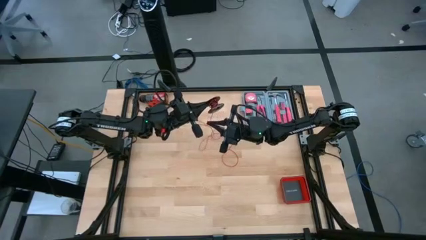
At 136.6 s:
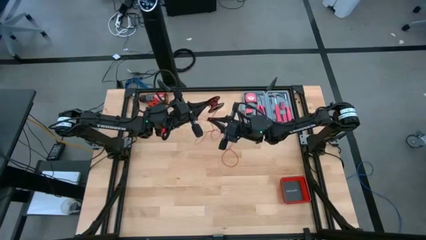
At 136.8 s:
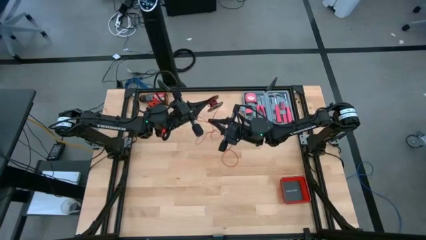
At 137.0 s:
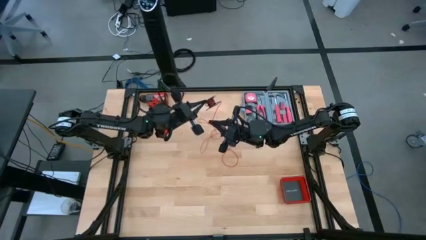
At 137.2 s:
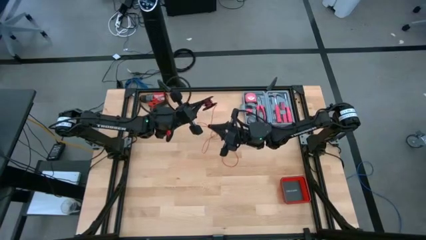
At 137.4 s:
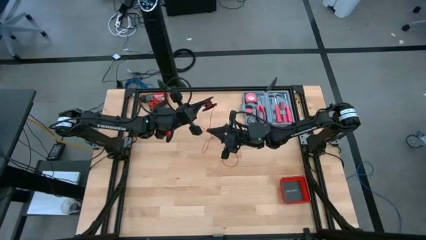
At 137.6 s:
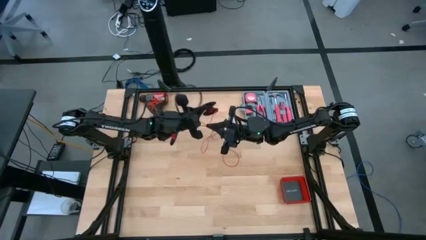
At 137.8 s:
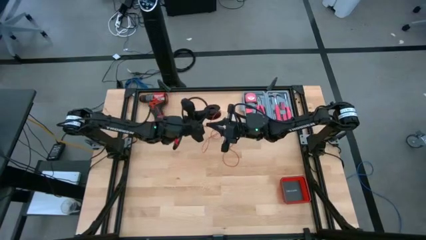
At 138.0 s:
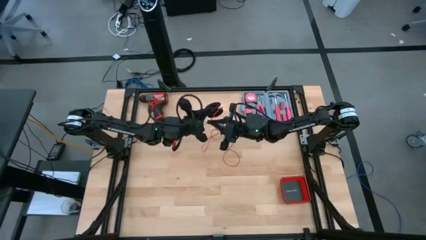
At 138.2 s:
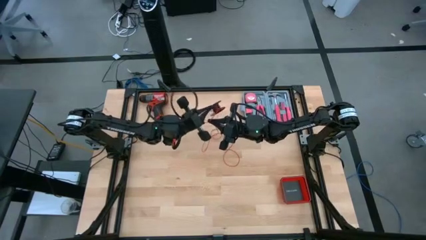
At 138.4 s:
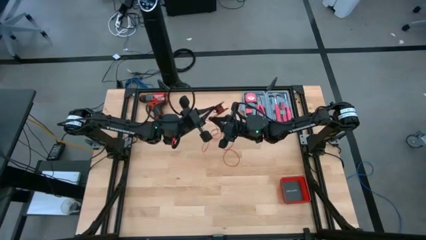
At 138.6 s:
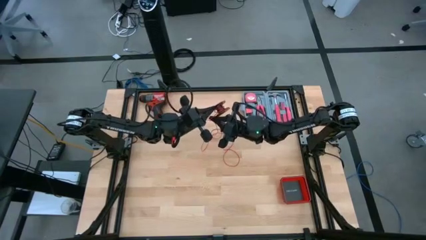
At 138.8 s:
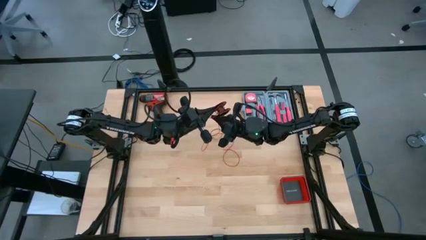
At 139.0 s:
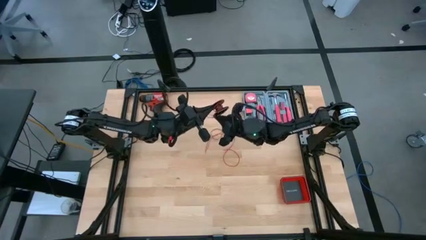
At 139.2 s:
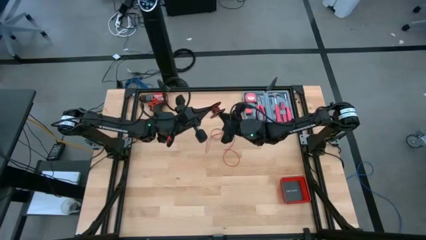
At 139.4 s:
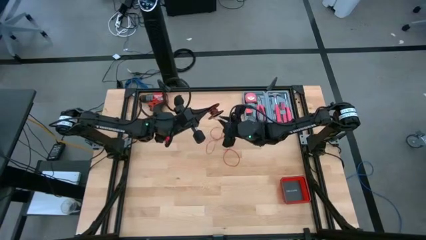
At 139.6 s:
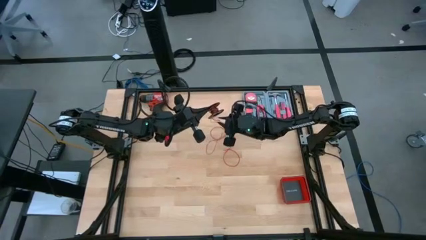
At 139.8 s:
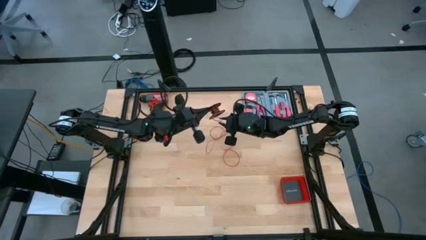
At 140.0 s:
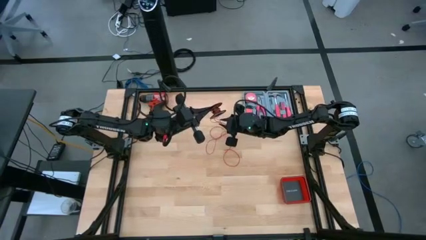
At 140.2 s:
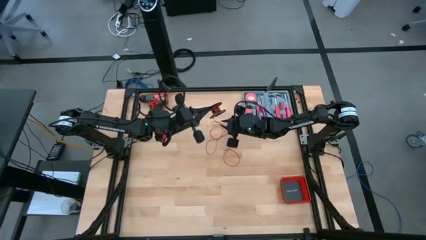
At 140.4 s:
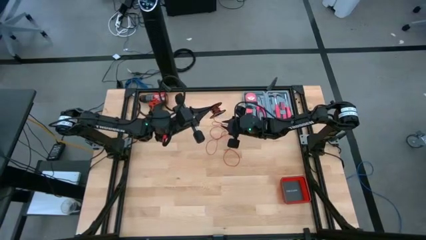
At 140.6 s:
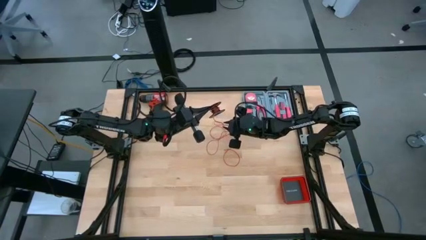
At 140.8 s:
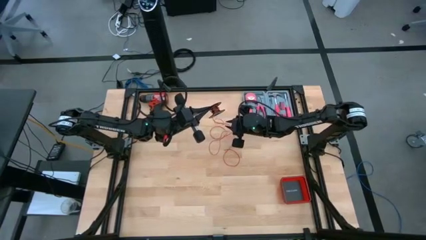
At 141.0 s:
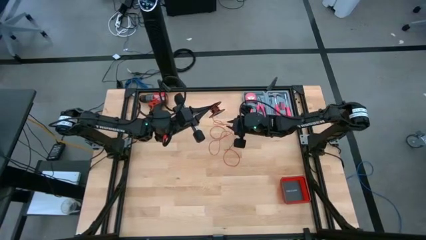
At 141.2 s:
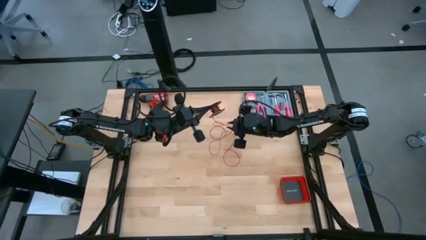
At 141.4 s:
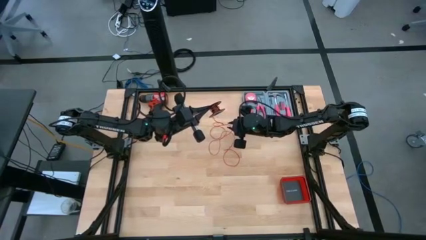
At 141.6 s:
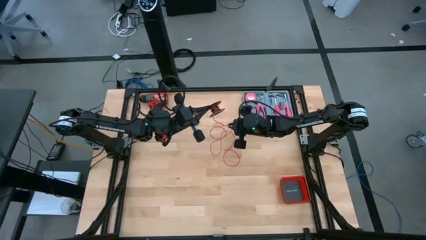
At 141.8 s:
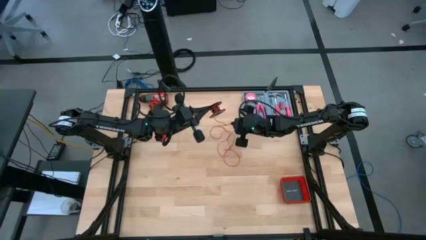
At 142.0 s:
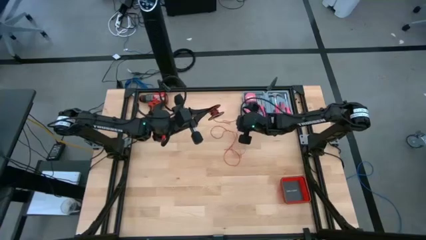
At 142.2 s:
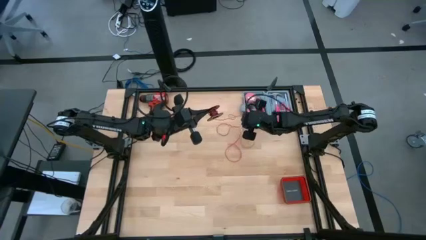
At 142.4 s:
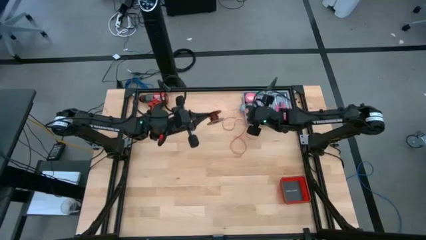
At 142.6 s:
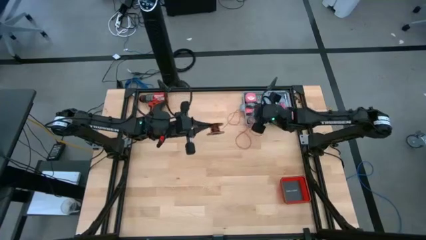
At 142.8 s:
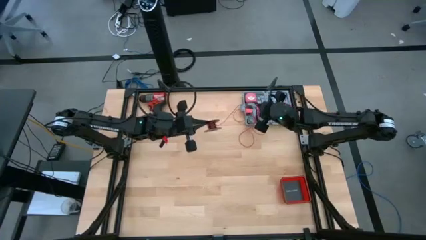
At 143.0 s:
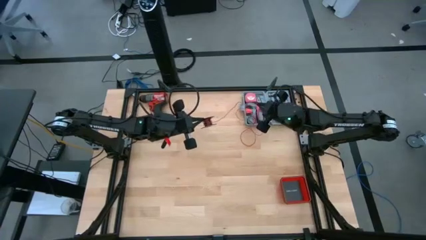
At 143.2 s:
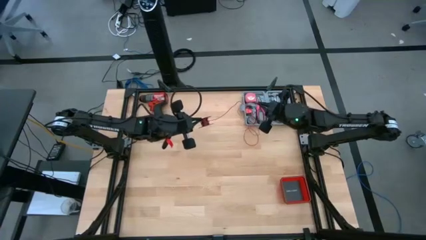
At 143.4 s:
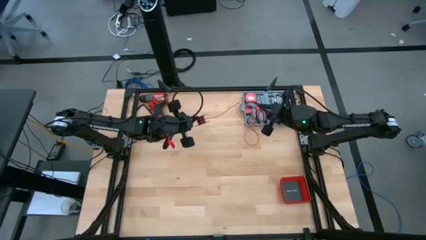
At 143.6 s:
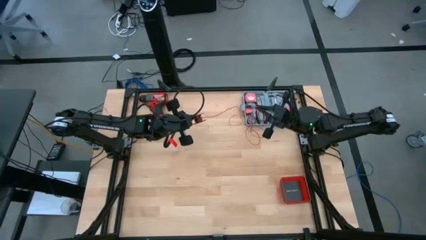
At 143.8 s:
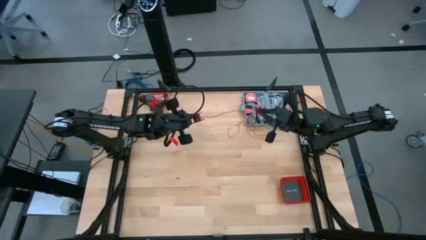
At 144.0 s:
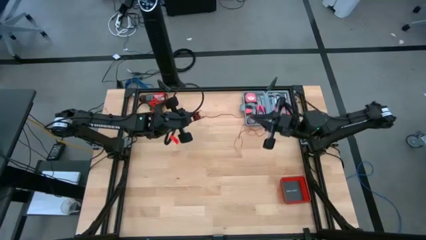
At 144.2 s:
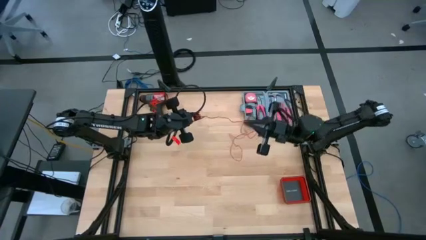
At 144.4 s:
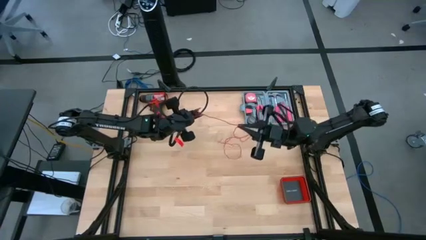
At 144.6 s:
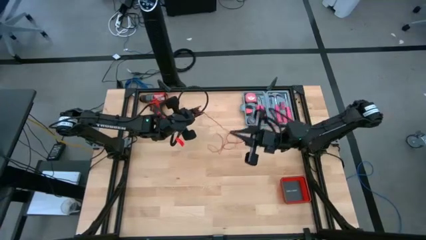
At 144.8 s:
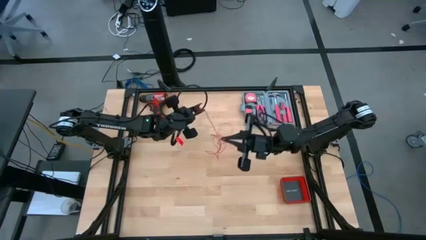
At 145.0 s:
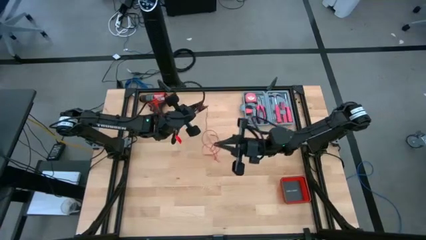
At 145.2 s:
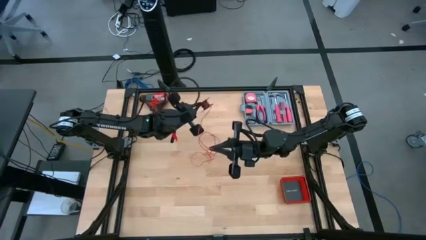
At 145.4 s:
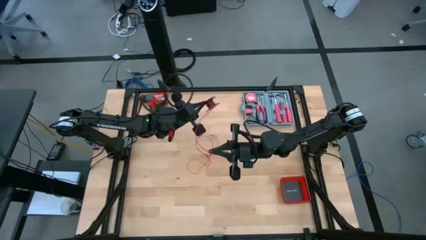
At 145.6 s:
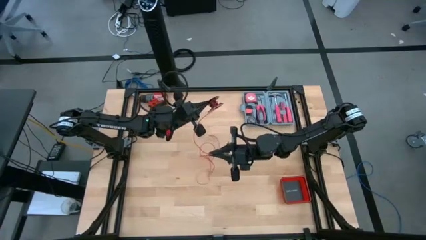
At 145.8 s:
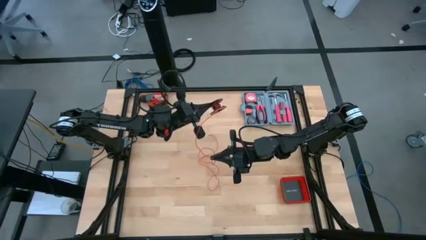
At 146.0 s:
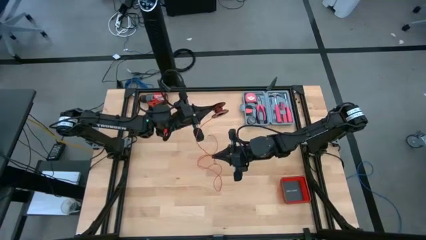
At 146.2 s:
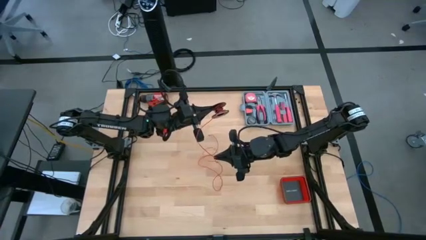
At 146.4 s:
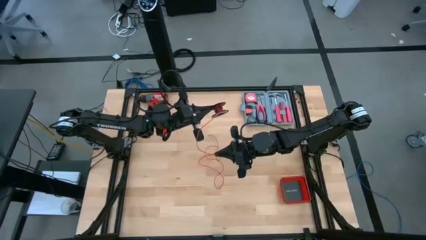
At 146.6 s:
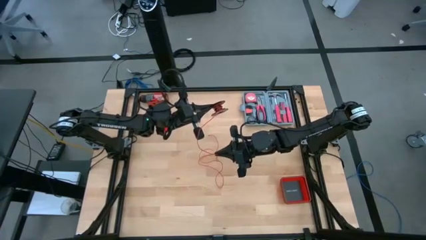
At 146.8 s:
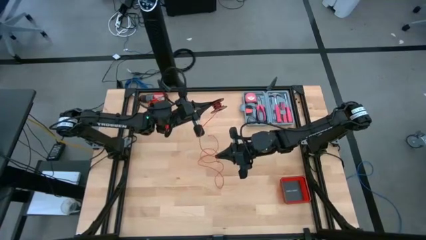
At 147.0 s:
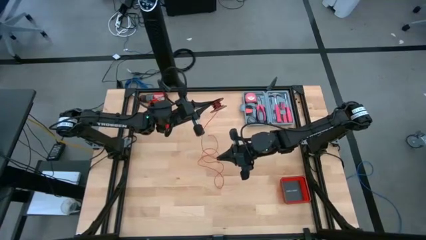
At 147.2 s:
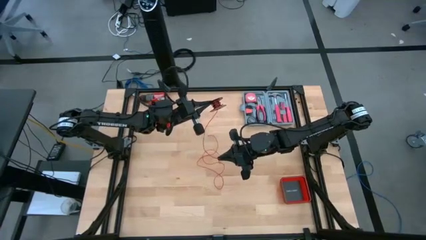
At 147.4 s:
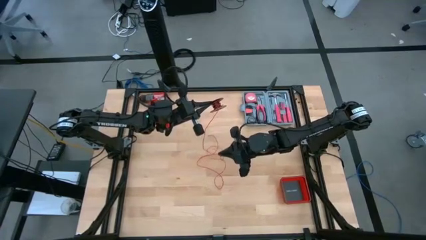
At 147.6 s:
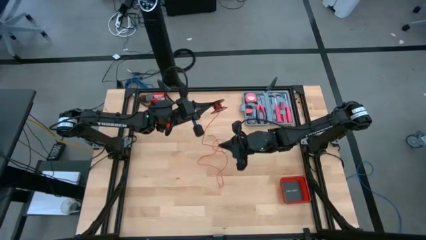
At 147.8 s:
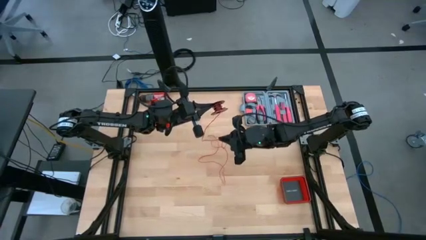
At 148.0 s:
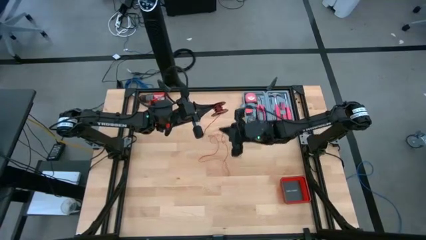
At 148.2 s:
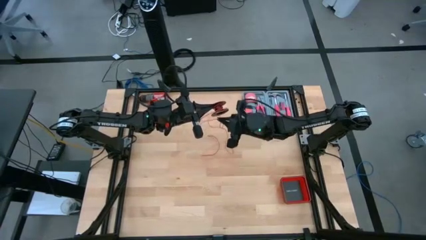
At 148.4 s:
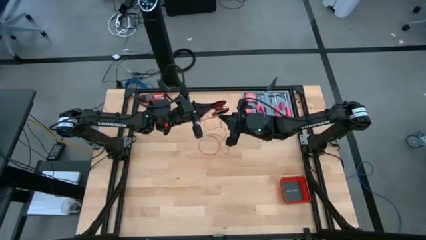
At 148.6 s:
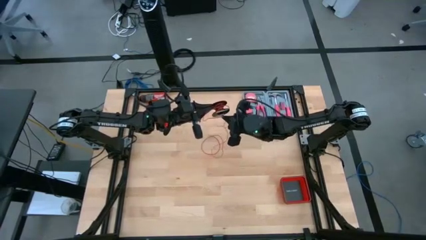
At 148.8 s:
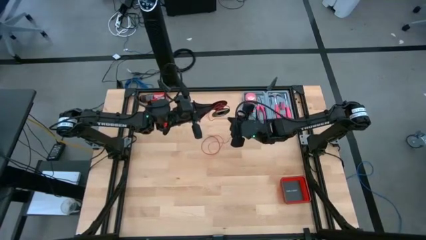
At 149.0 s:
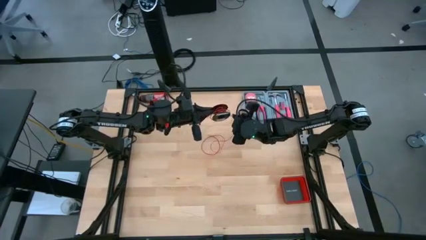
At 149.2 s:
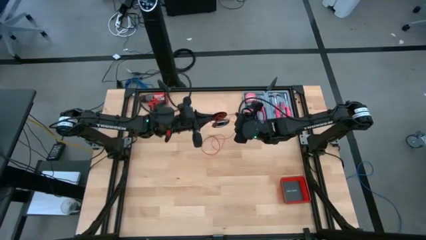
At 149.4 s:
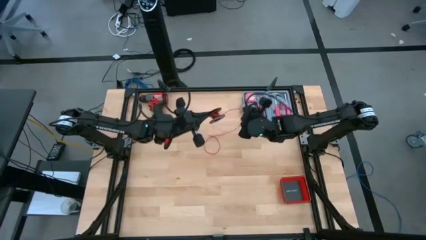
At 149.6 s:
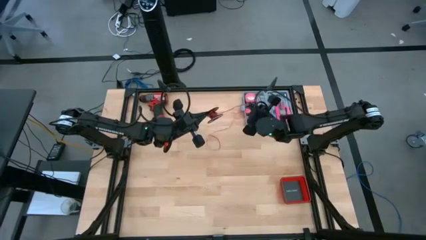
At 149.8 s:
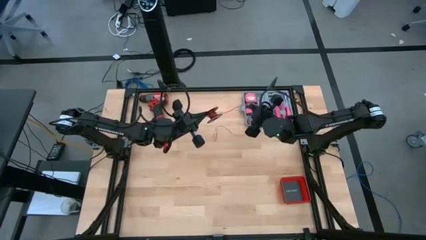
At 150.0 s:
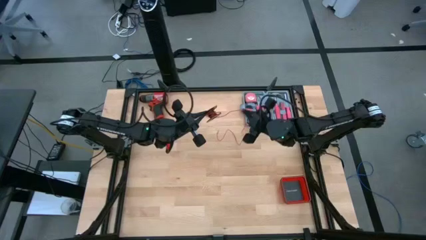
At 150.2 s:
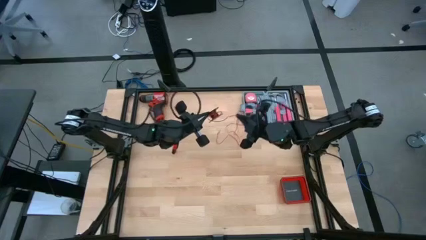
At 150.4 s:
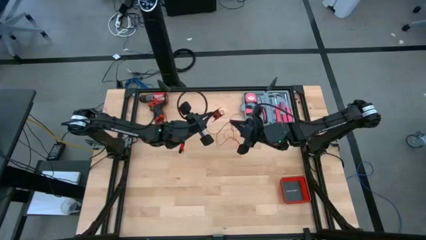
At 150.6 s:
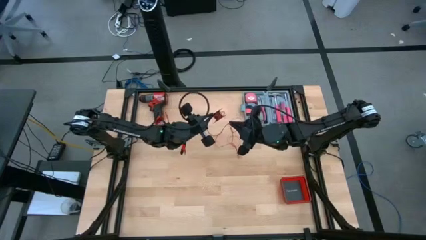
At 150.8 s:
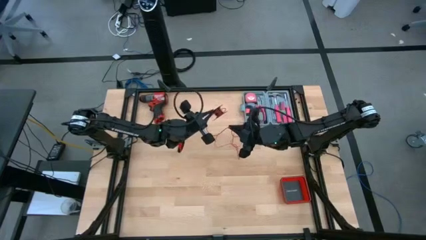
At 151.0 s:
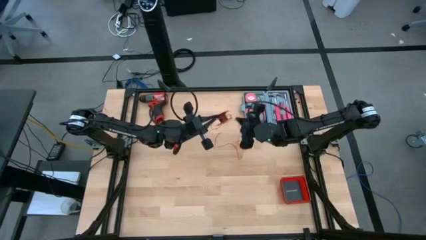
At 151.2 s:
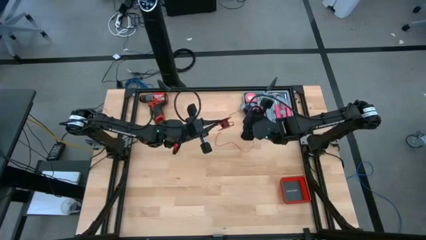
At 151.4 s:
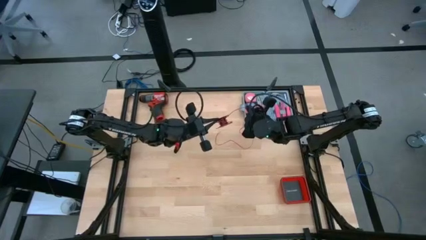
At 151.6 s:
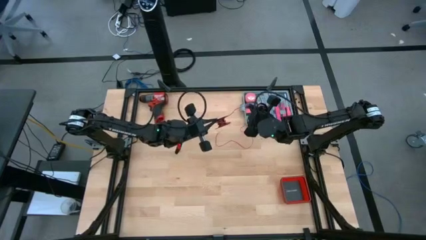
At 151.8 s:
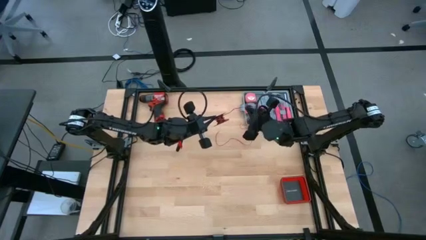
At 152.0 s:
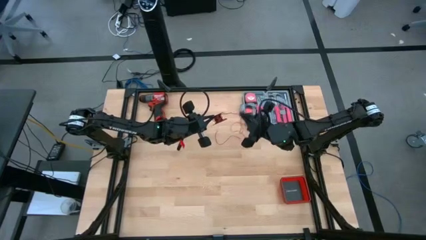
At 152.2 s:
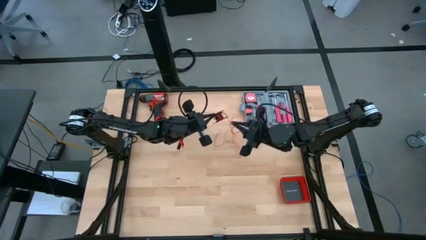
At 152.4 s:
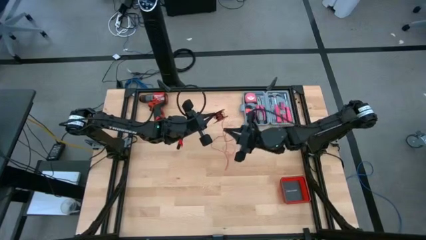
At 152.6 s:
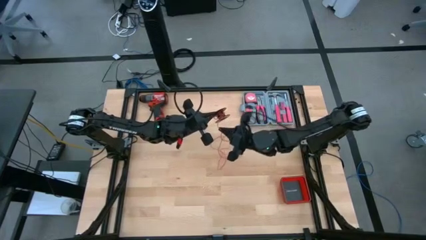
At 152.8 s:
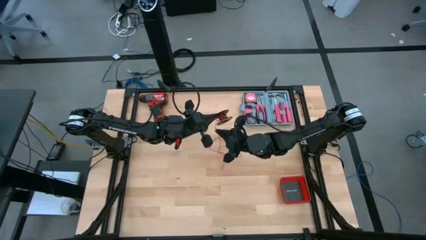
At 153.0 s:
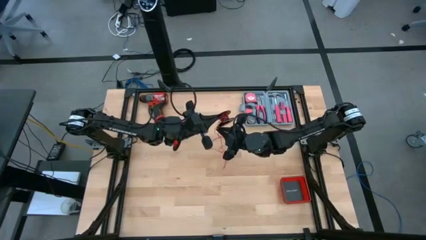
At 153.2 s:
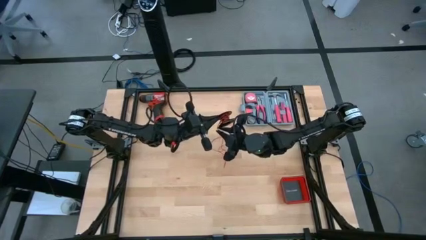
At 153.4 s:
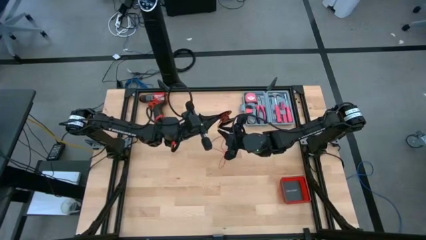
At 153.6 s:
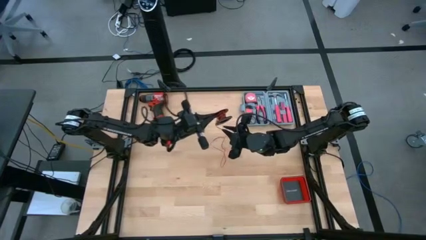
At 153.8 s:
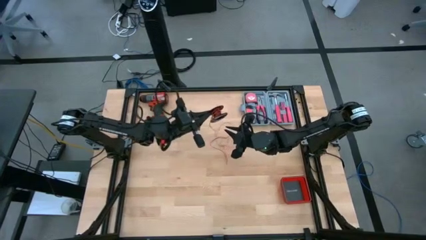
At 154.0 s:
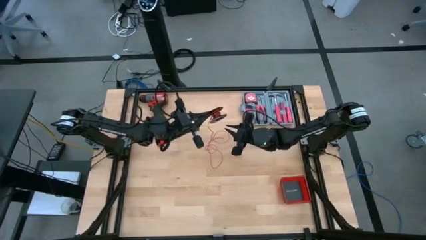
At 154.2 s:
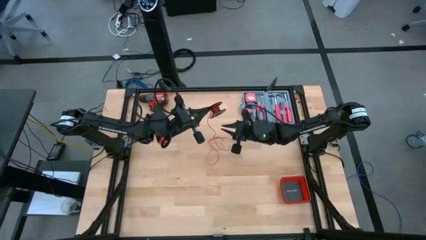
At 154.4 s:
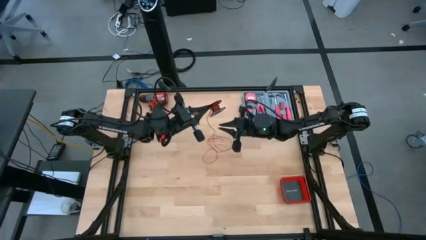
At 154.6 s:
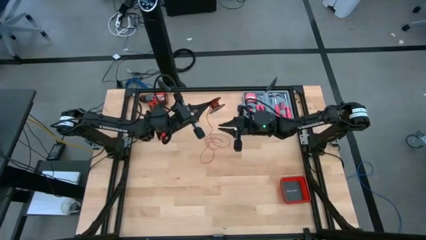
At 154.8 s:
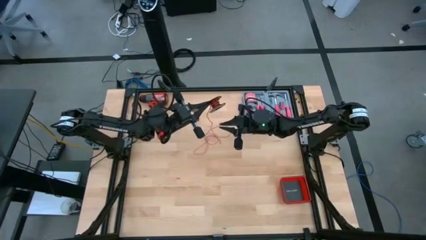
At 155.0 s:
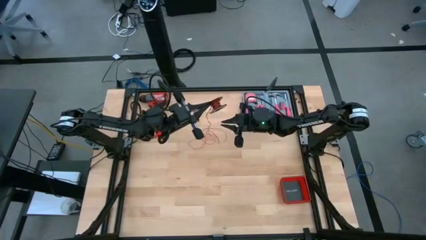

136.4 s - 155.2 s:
Task: Coil cords
Coil the red wire on the black spool
